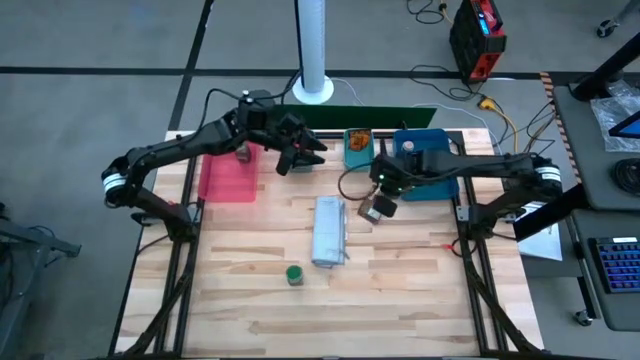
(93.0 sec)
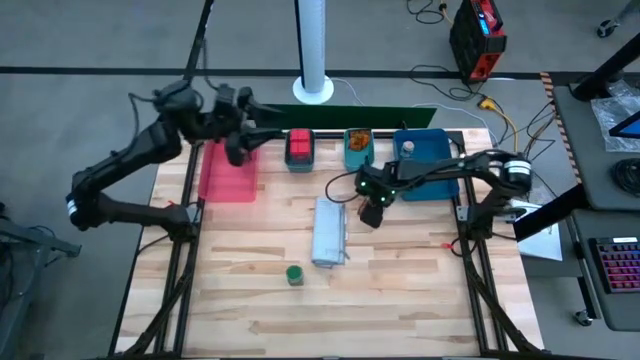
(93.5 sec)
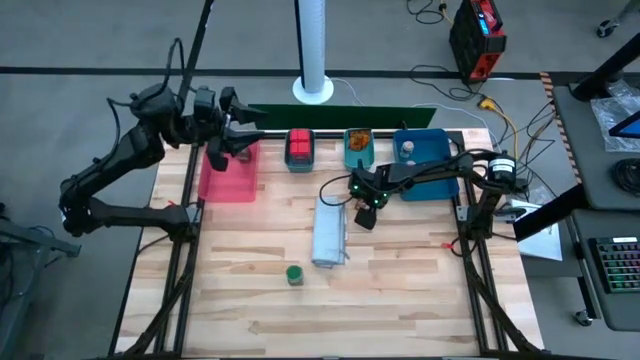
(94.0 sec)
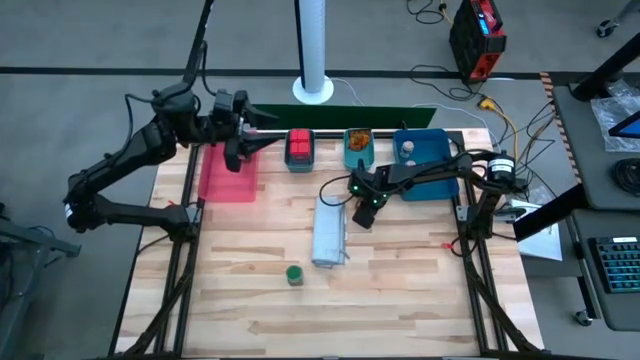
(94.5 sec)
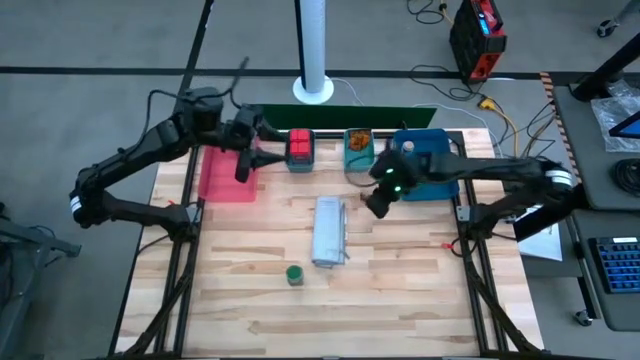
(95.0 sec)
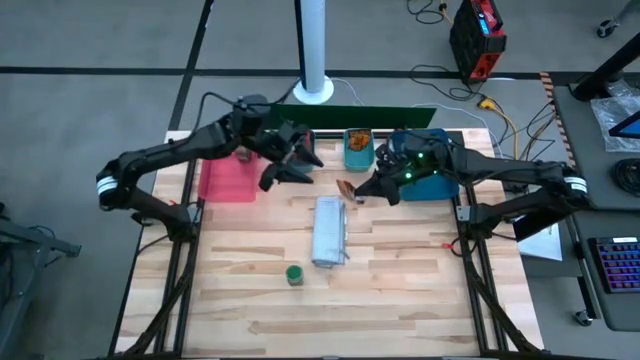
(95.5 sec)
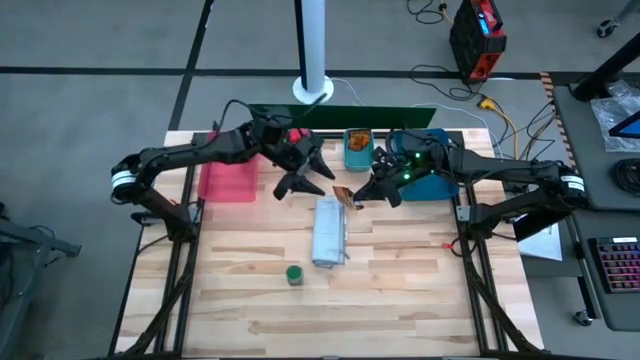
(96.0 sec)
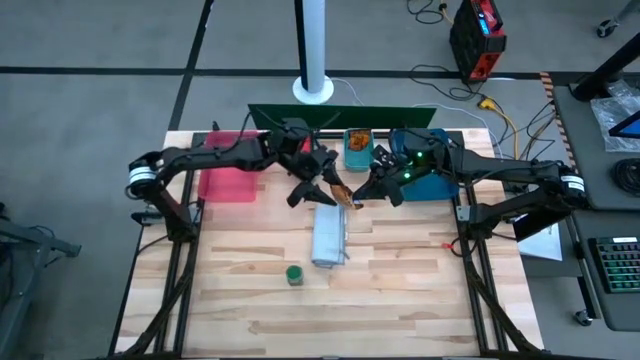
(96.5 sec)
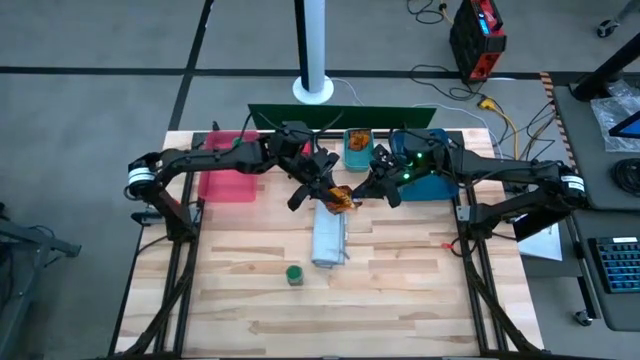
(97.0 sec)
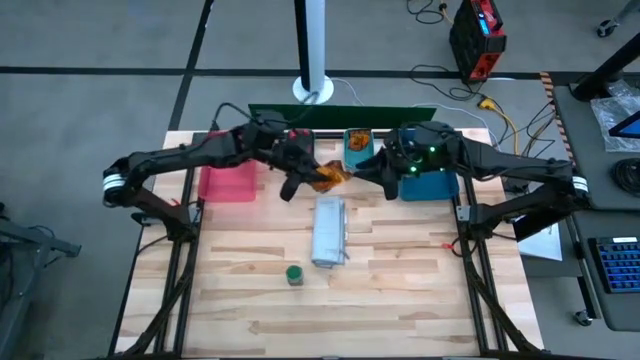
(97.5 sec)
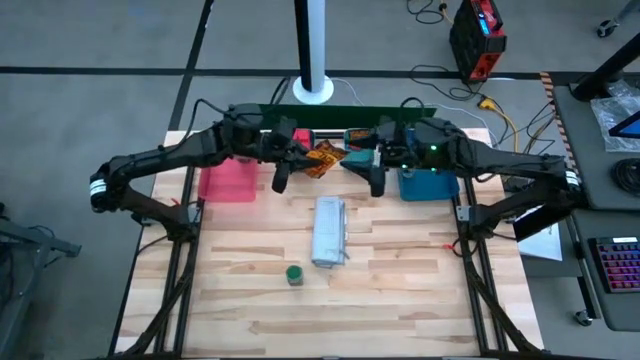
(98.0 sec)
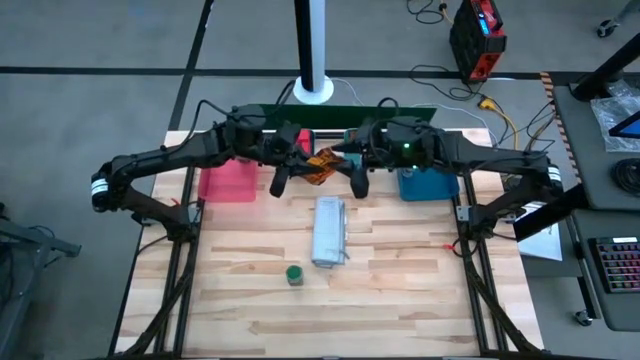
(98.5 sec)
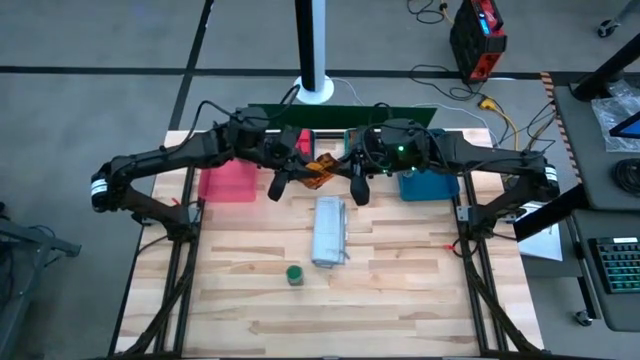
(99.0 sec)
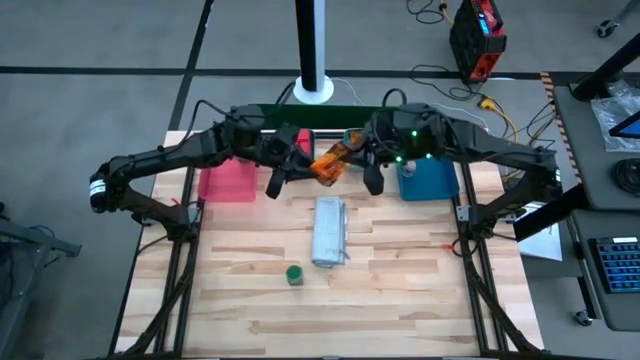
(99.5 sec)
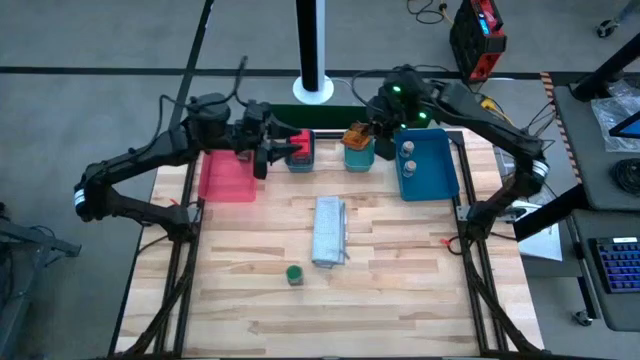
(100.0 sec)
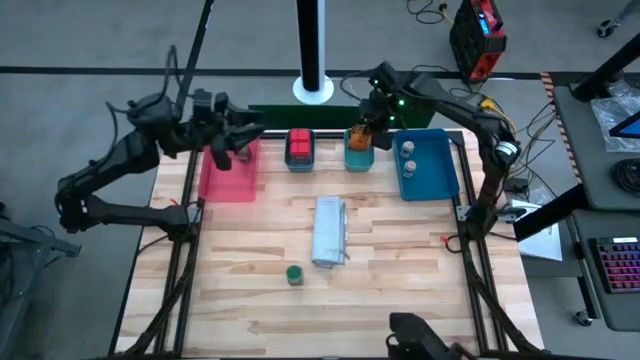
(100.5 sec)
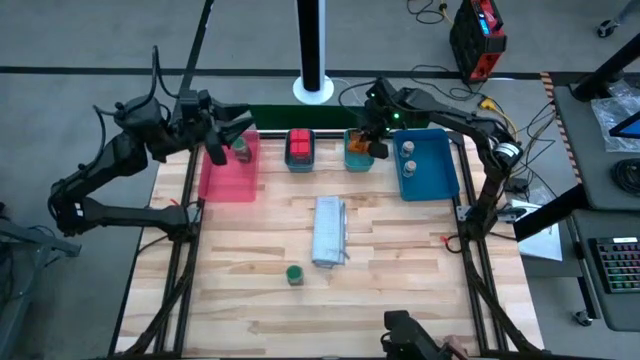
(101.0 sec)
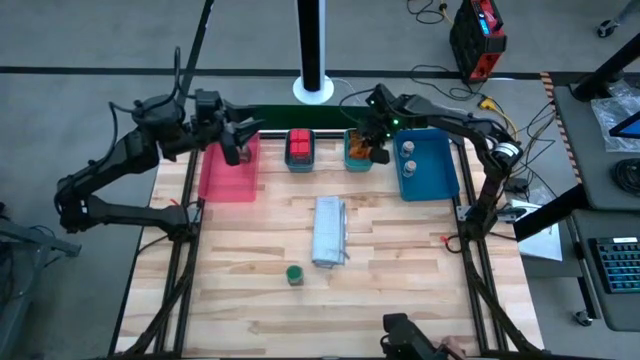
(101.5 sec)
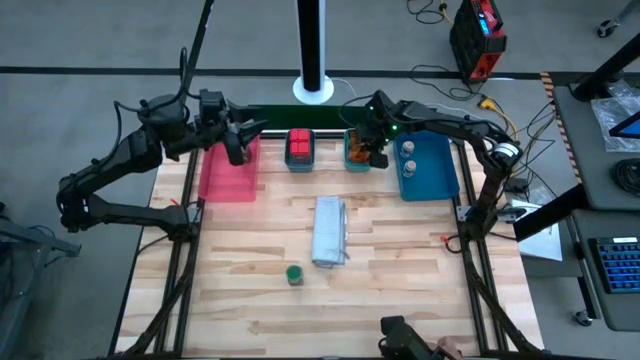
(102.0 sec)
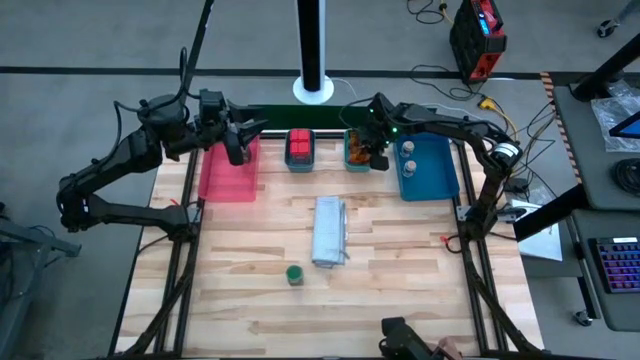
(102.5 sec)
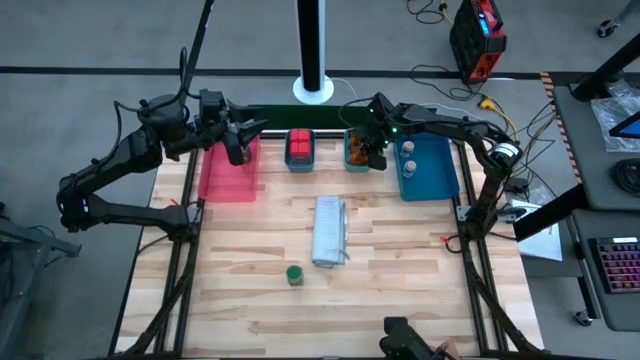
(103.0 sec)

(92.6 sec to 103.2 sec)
Task: Sort spices by type
Put the orange seasoning pack into the green bin

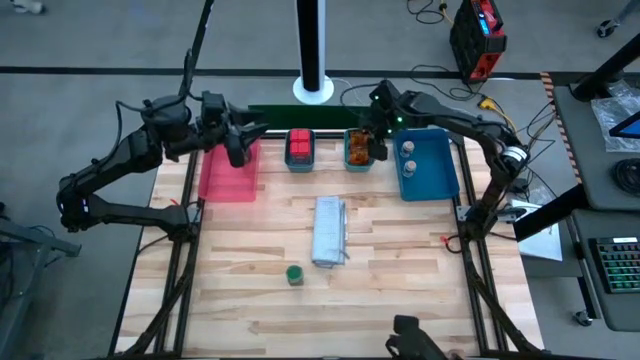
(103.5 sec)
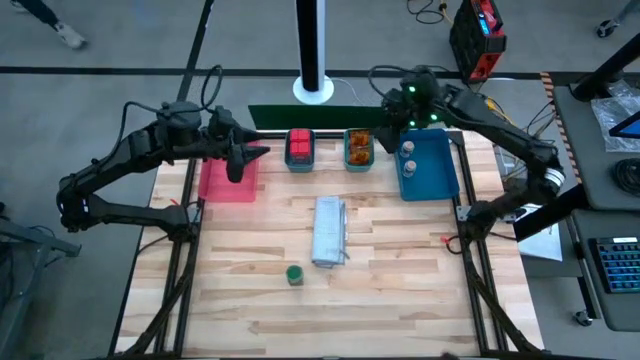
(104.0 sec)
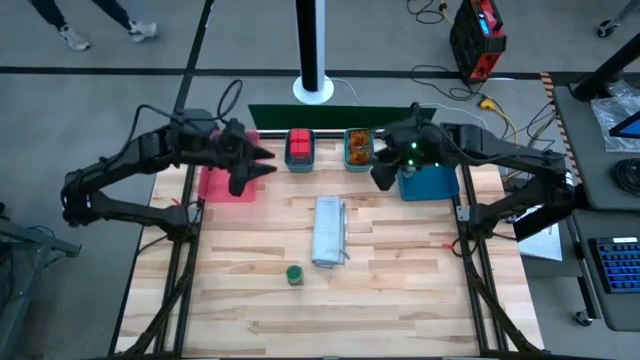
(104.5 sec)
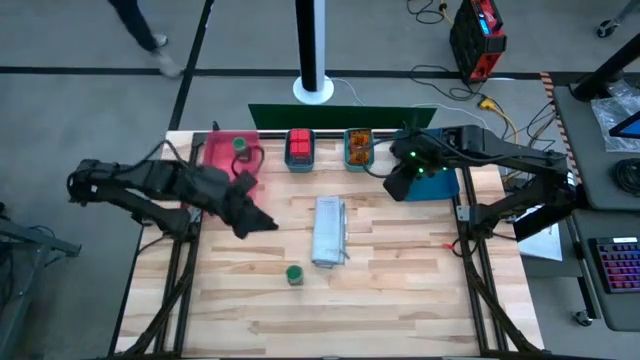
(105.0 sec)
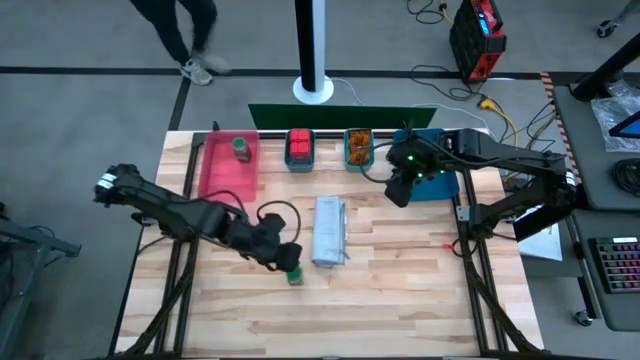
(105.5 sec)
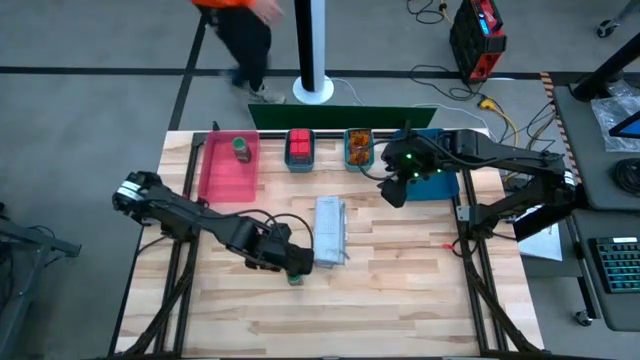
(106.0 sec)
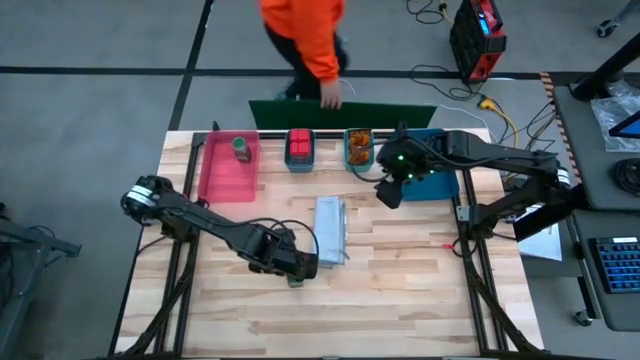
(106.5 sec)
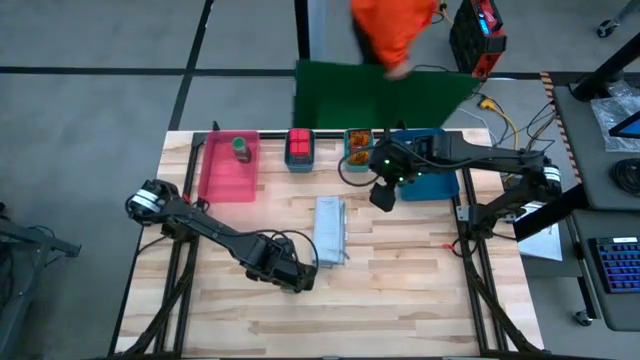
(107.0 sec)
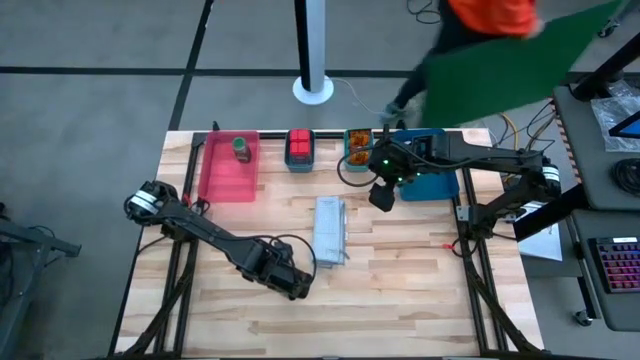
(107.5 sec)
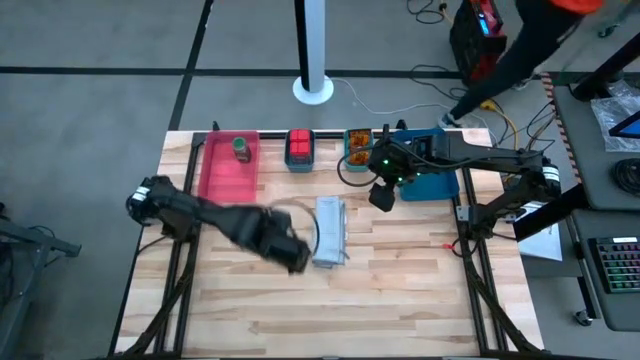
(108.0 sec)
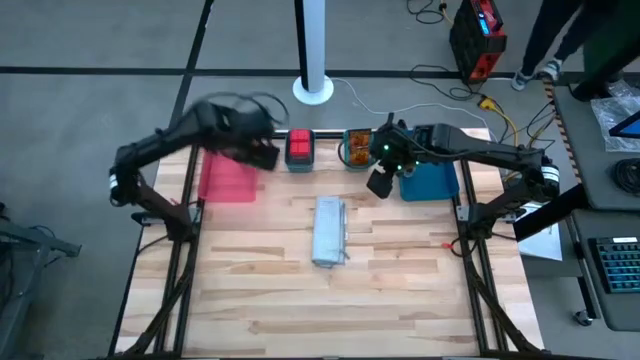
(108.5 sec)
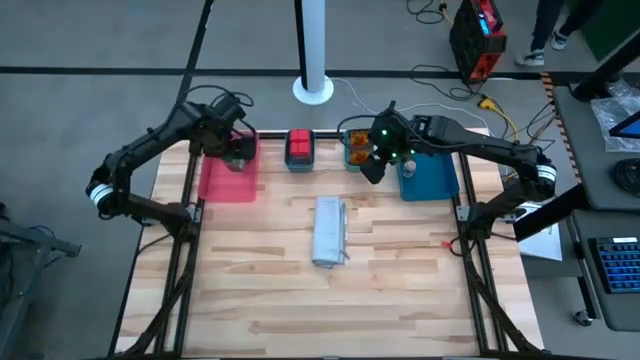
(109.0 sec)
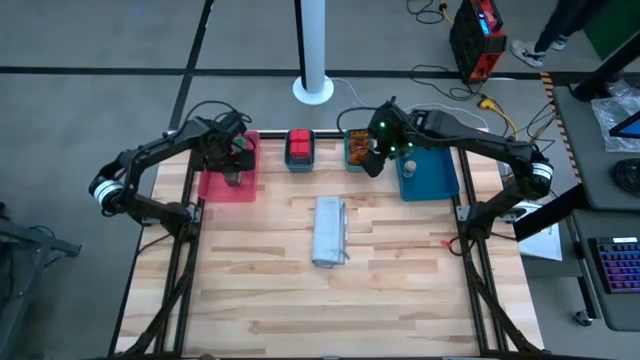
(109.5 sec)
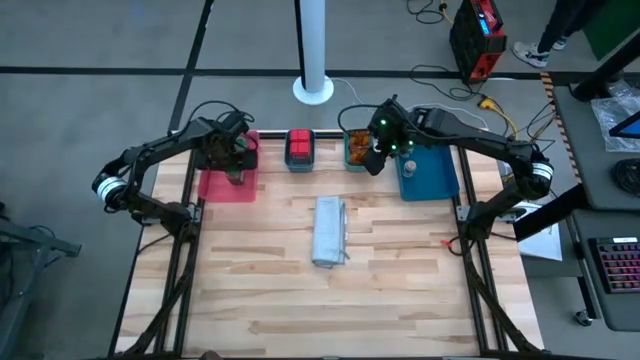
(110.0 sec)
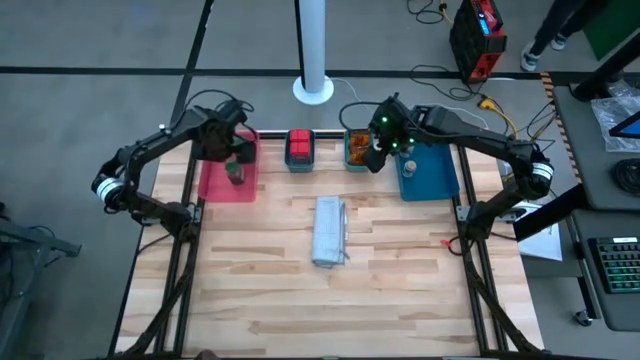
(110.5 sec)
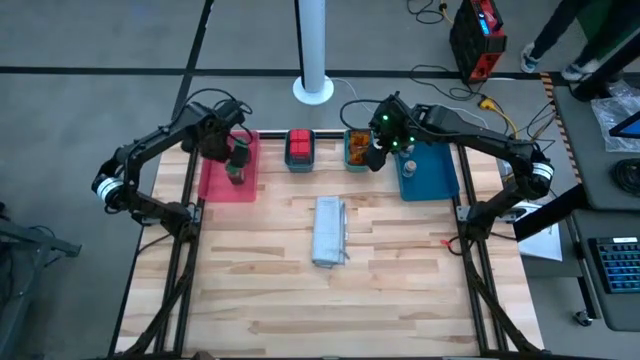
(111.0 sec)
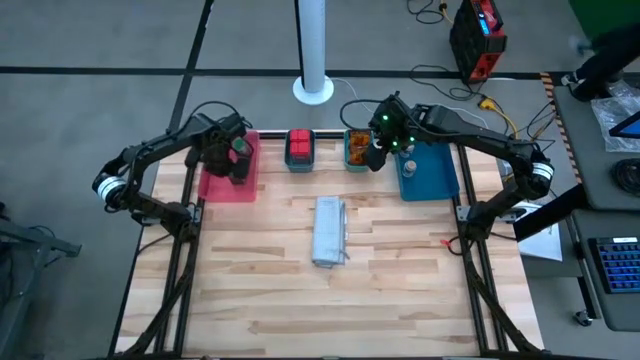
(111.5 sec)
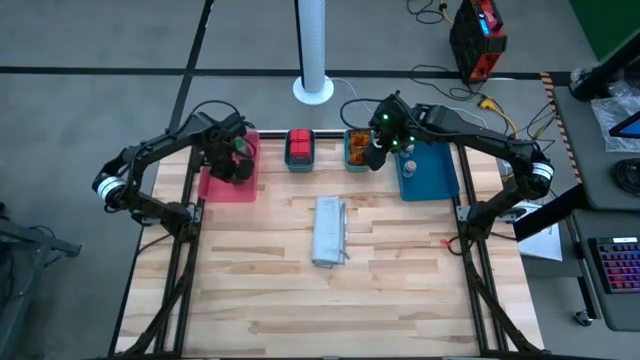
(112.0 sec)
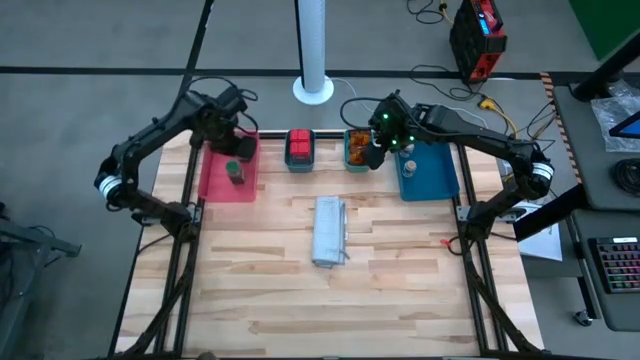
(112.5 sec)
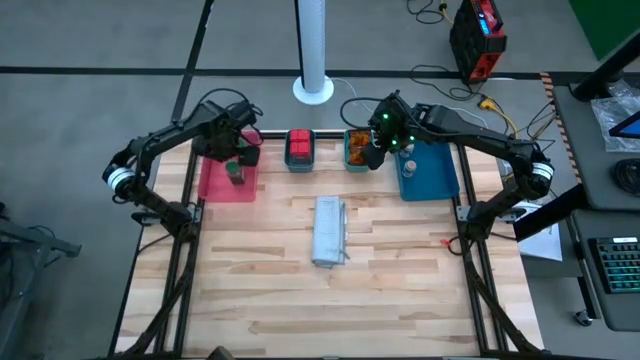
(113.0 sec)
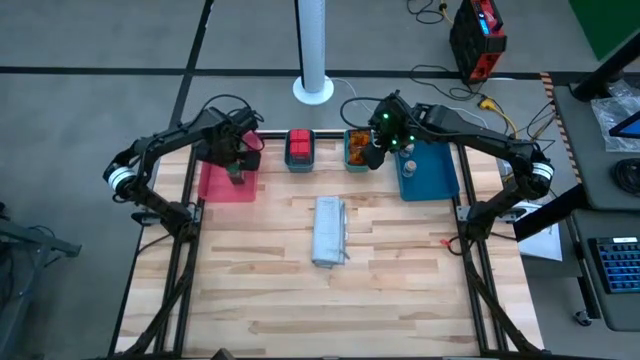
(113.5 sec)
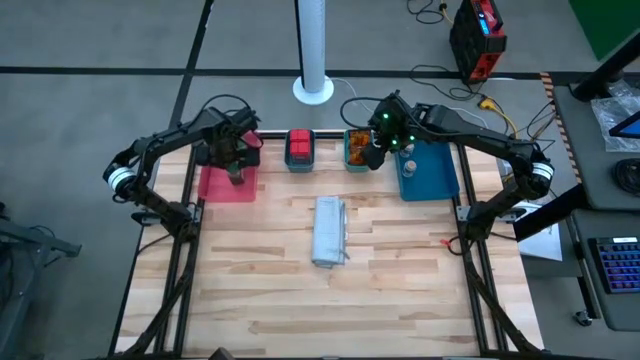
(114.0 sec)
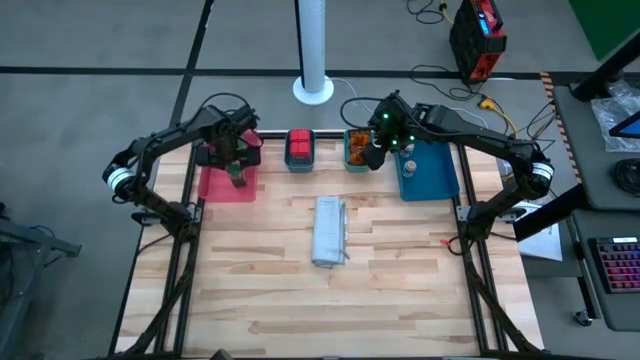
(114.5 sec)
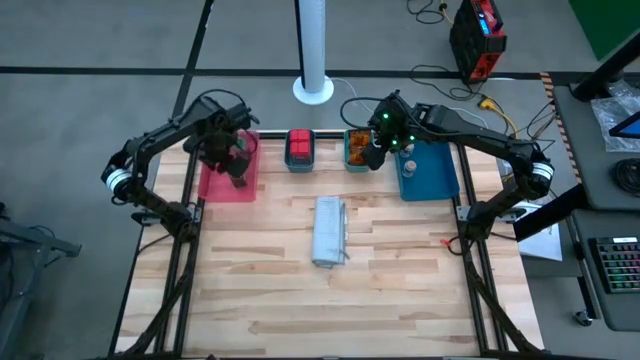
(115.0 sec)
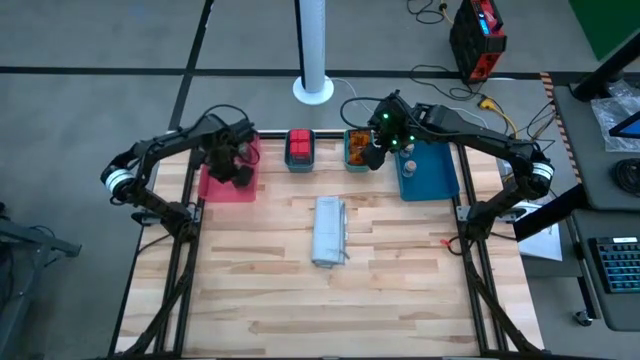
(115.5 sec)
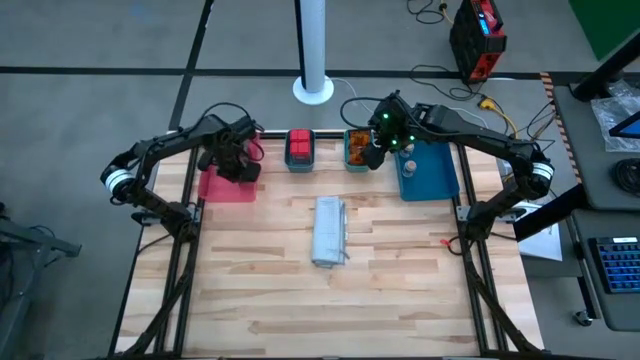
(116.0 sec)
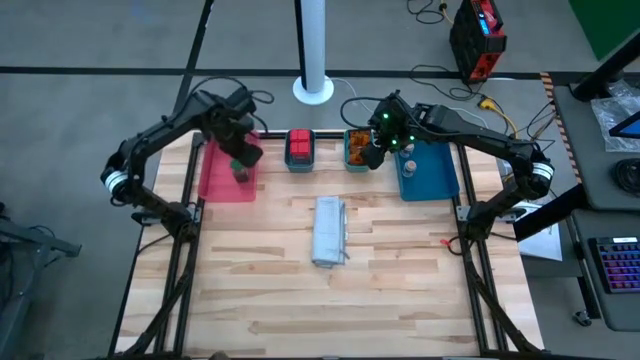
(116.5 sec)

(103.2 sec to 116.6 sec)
Put the green seasoning bottle into the pink bin
